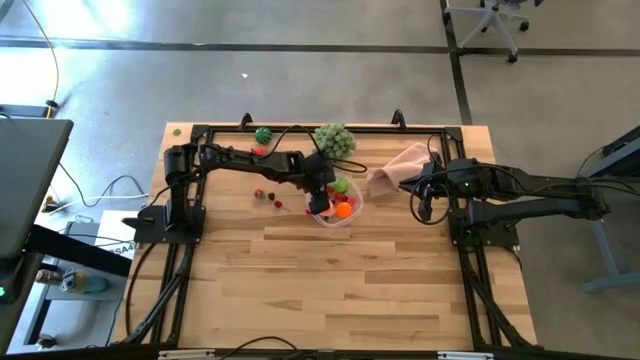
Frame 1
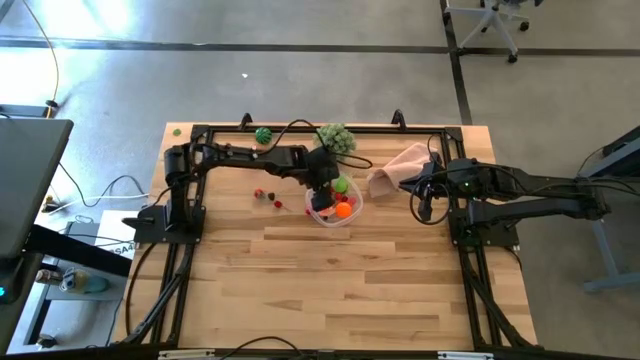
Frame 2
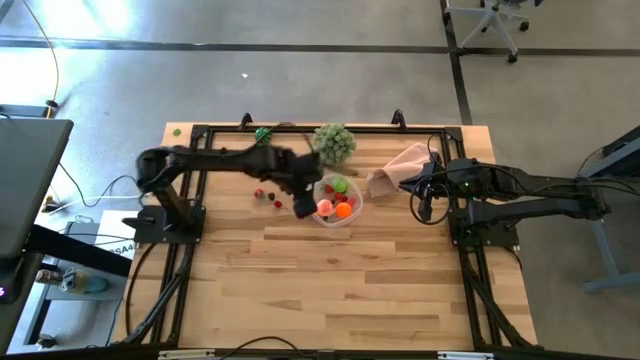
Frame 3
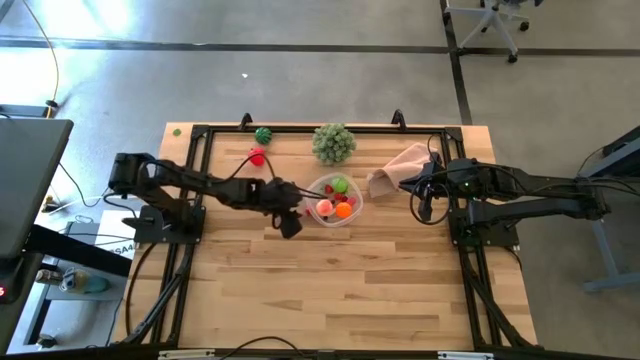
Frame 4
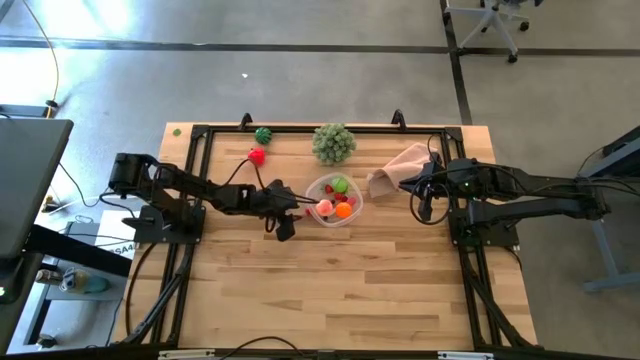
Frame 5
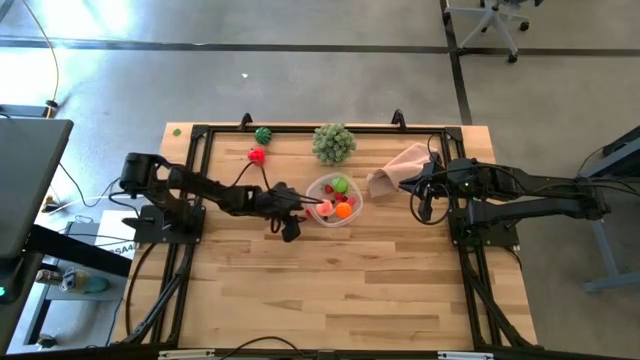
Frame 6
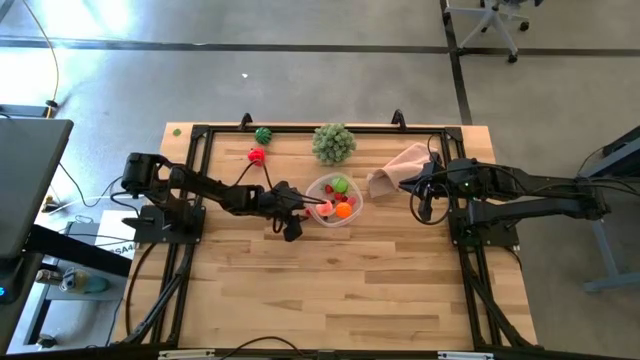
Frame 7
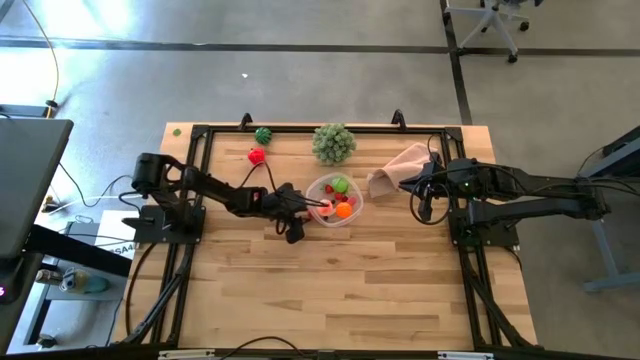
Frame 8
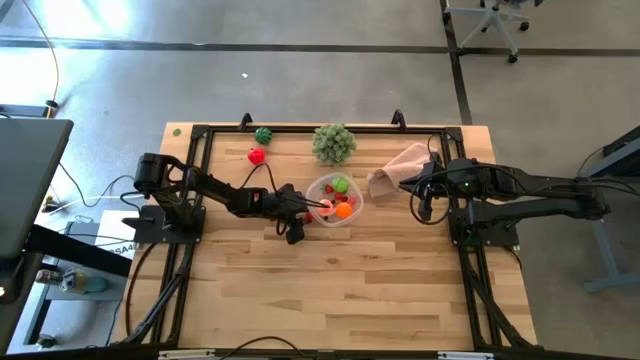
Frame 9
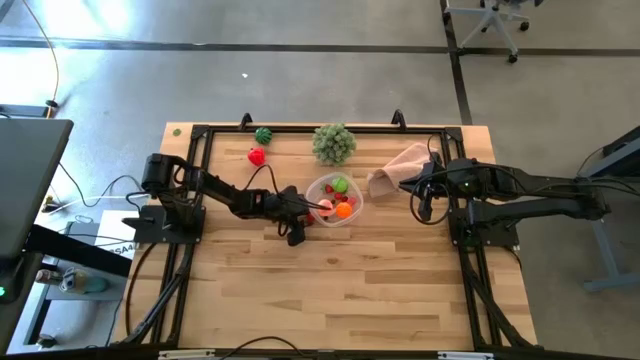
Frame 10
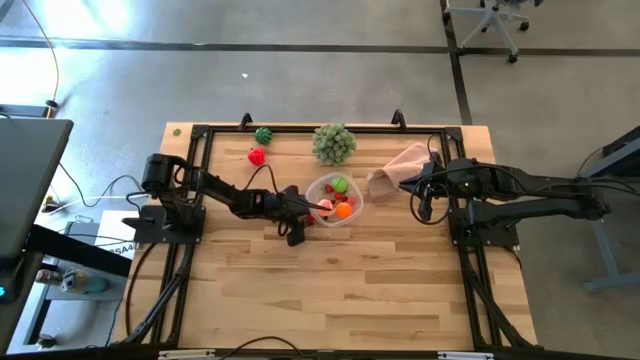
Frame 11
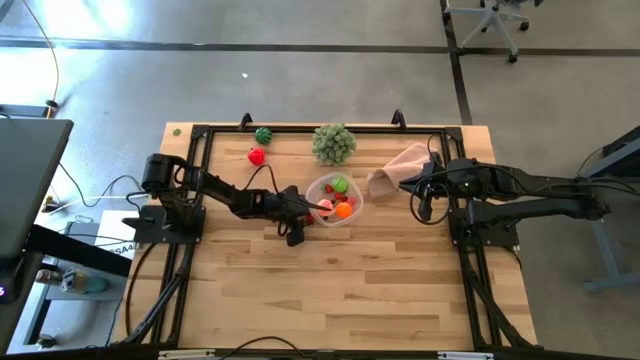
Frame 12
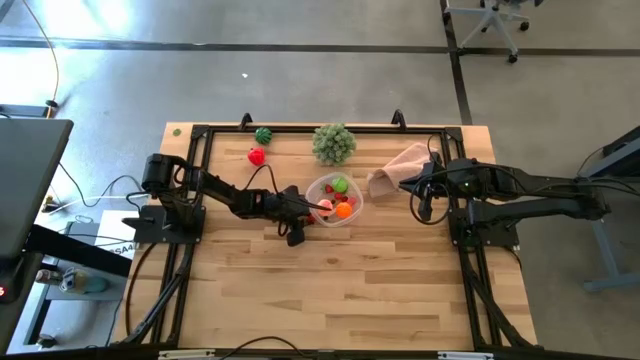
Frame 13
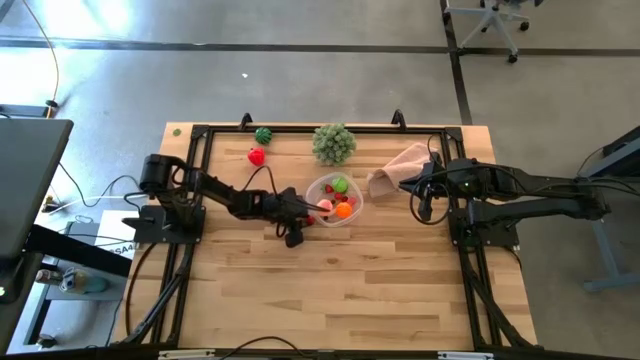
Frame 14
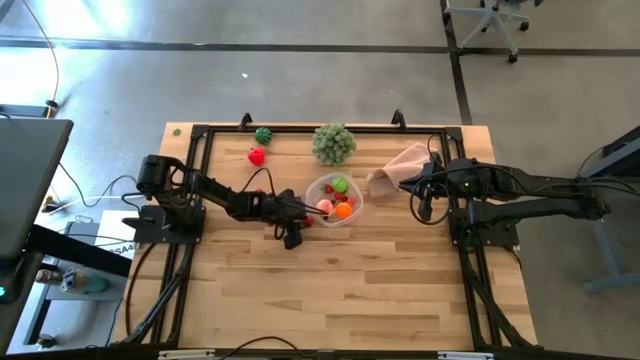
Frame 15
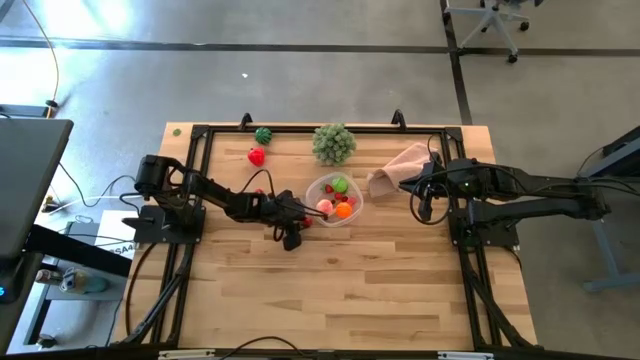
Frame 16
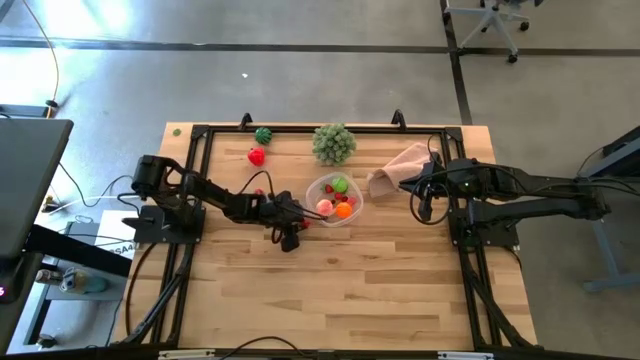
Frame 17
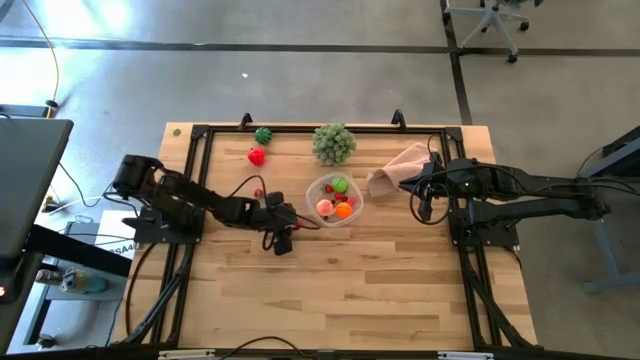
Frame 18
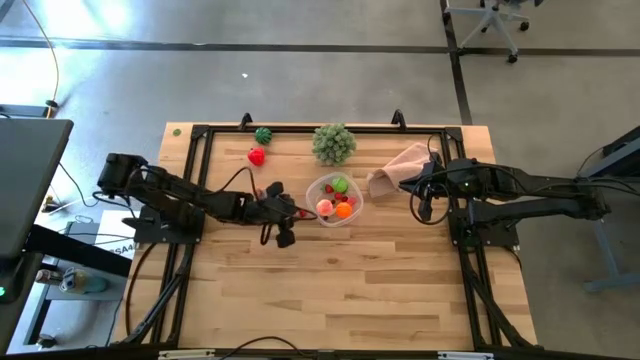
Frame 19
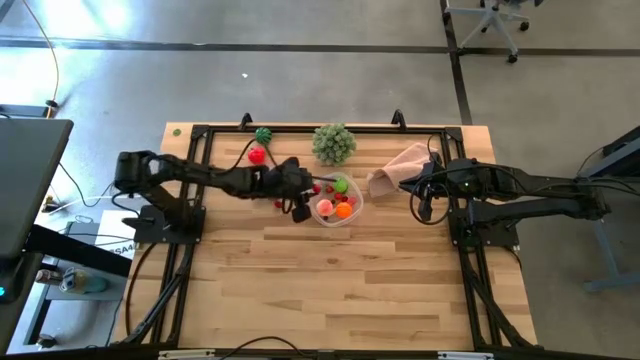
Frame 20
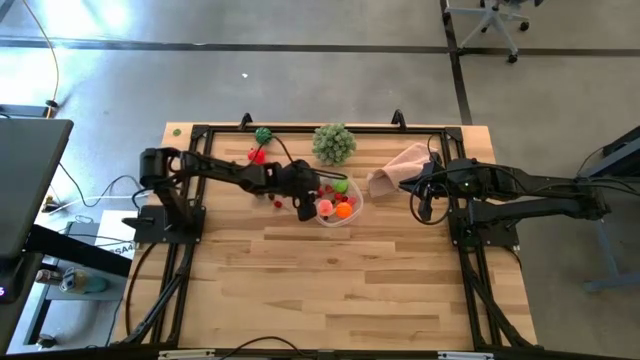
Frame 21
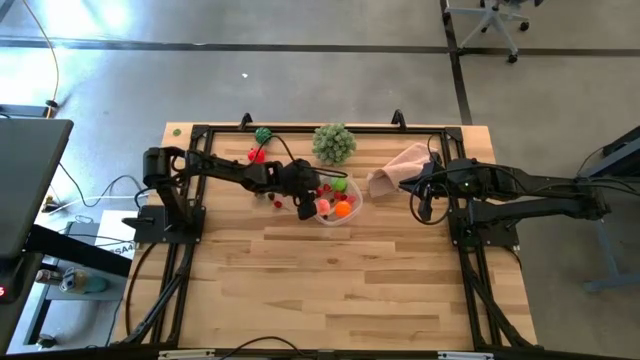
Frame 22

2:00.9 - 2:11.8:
Task: Pick and placing Produce into tupperware
Put the right cherry into the container

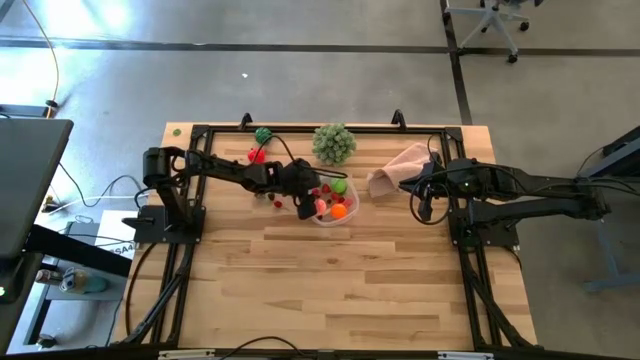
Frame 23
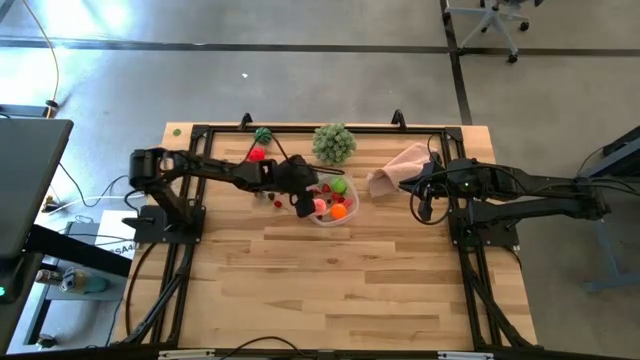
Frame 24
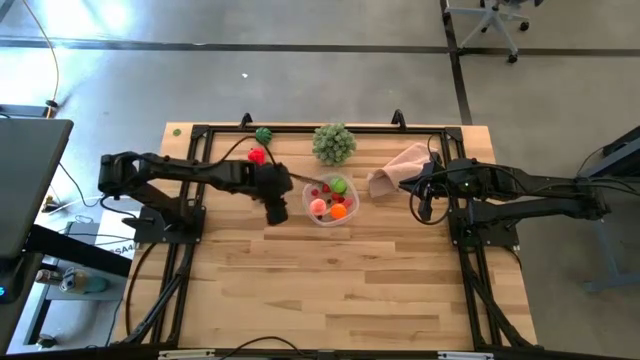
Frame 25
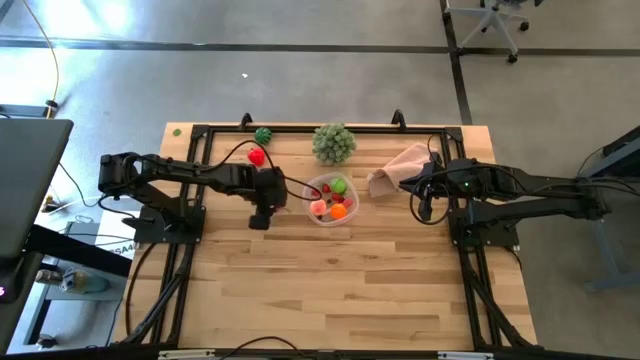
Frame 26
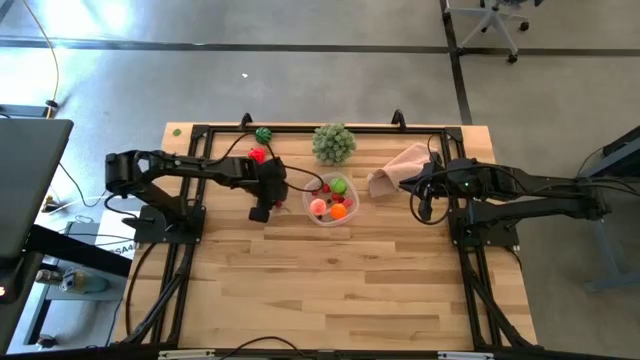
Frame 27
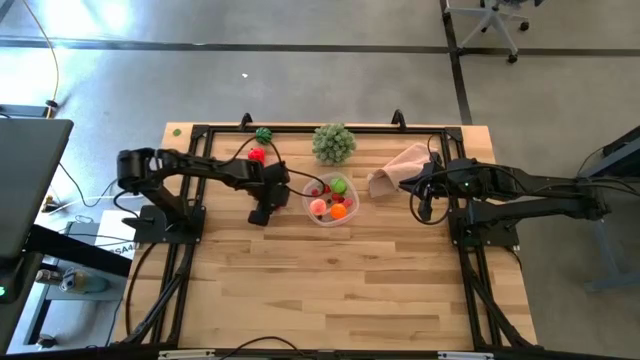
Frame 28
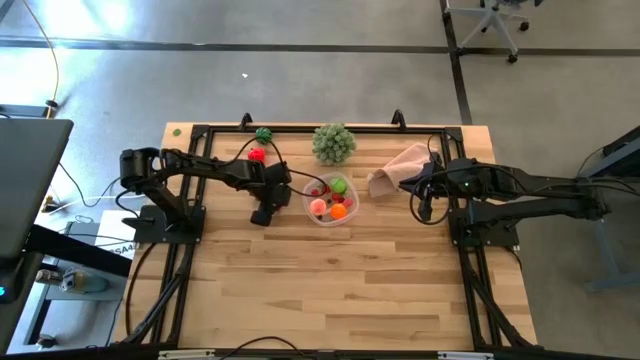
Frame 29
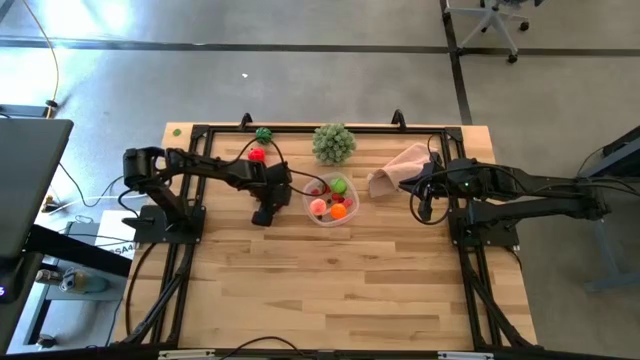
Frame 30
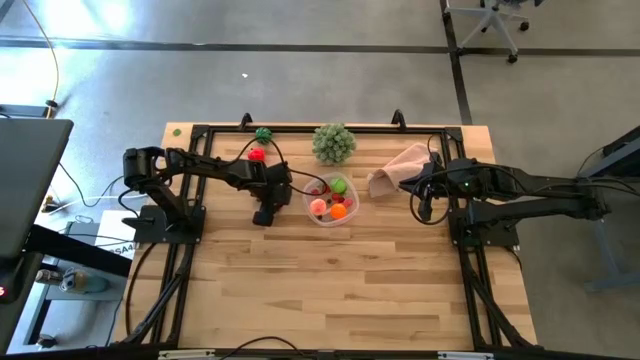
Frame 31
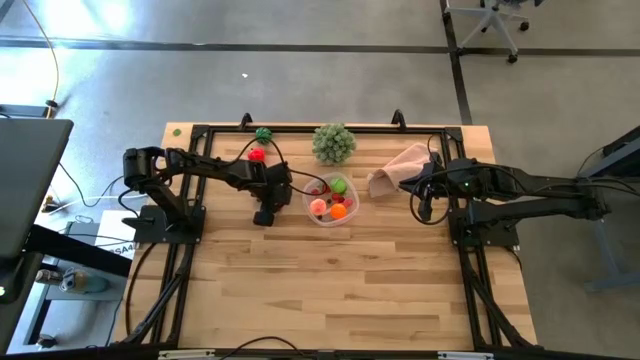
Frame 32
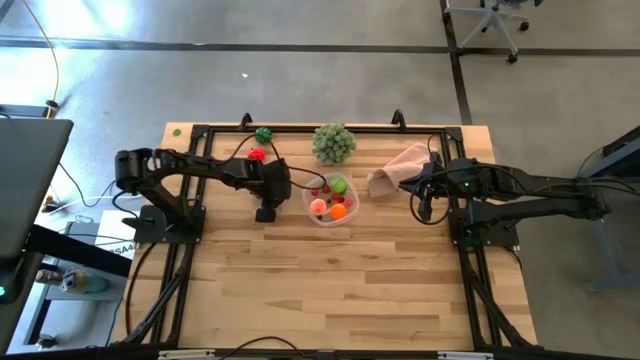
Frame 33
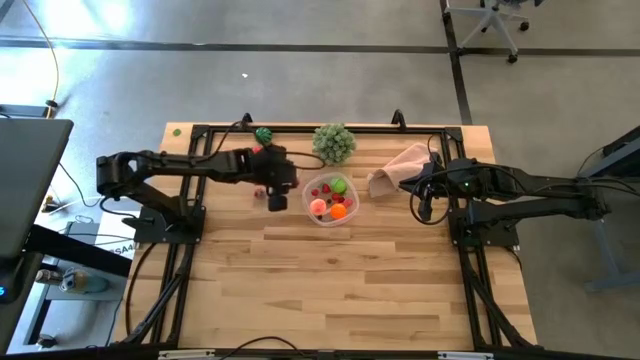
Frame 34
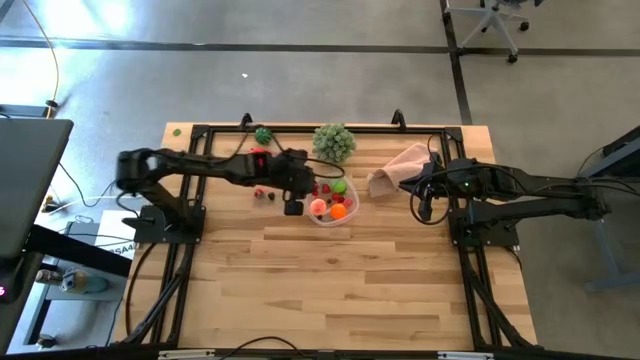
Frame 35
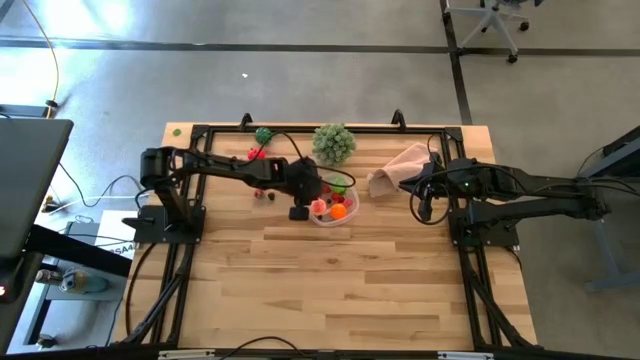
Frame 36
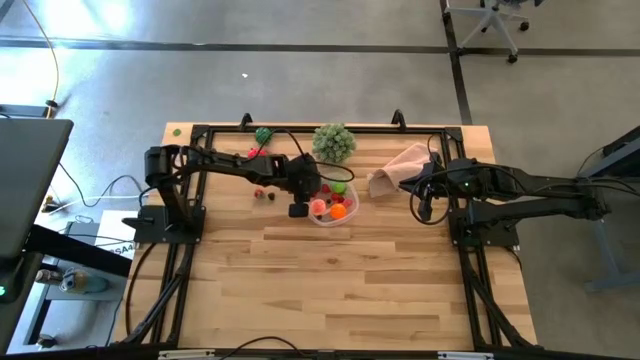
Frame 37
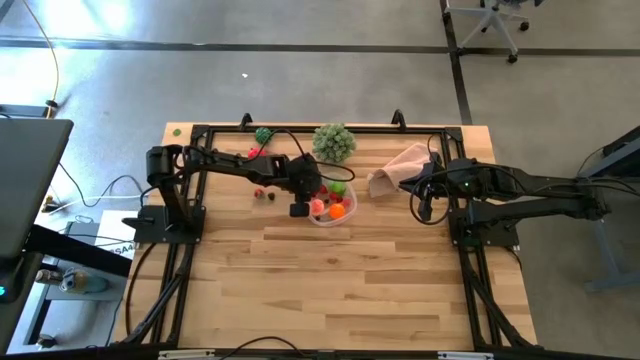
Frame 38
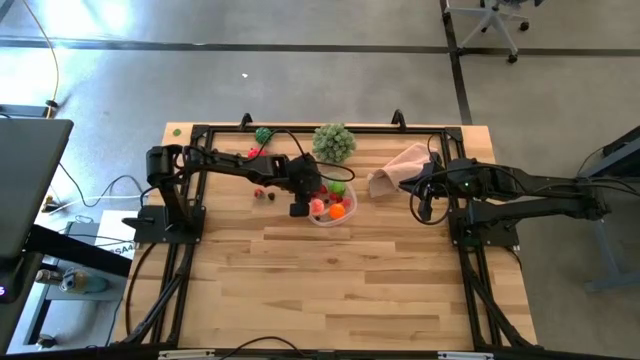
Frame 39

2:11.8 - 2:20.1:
Put the cherry into the container

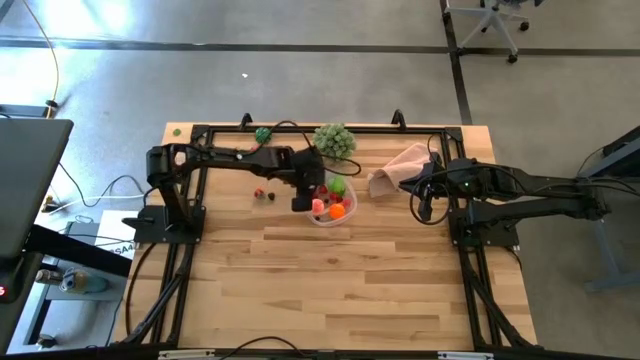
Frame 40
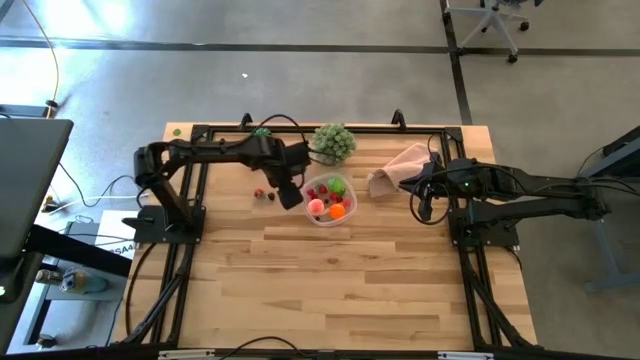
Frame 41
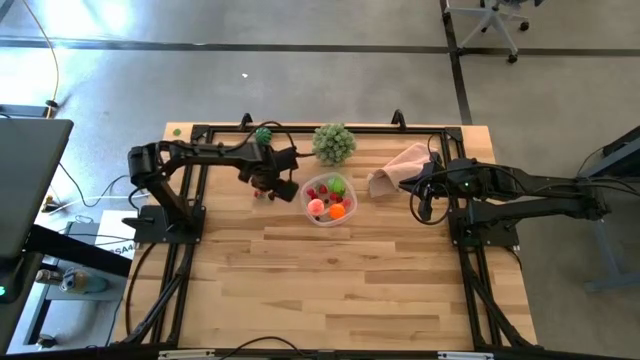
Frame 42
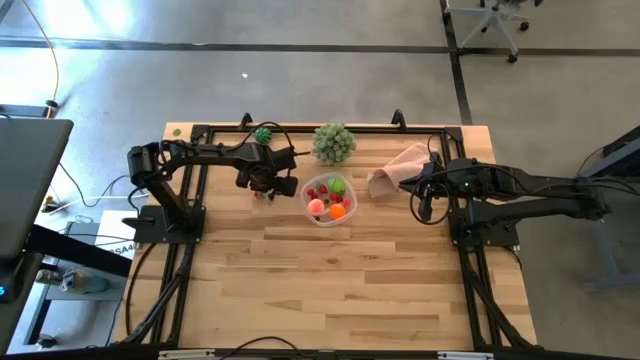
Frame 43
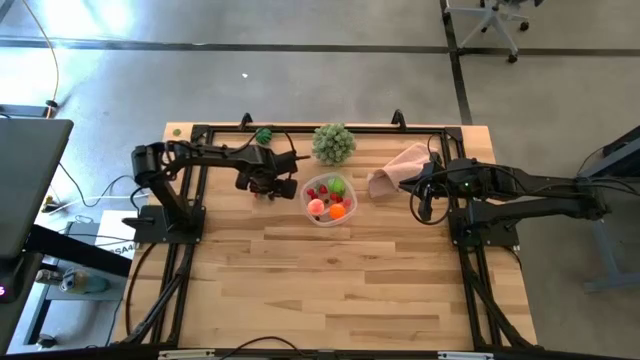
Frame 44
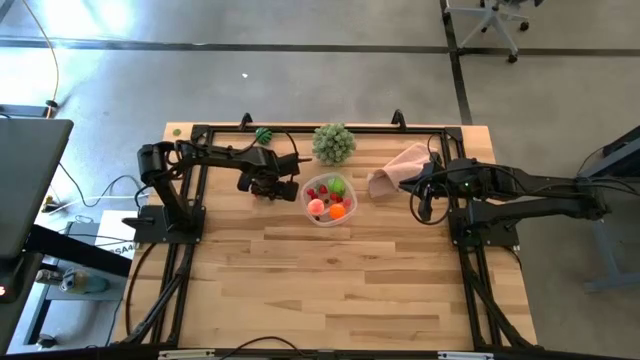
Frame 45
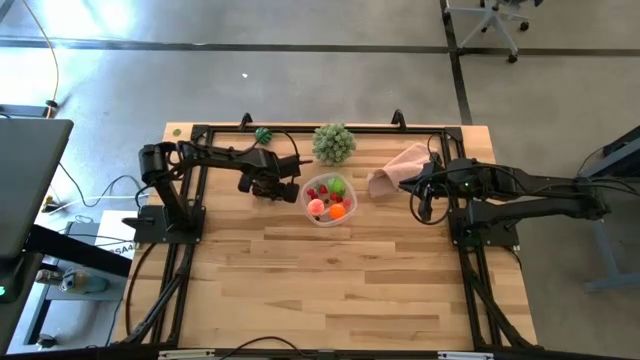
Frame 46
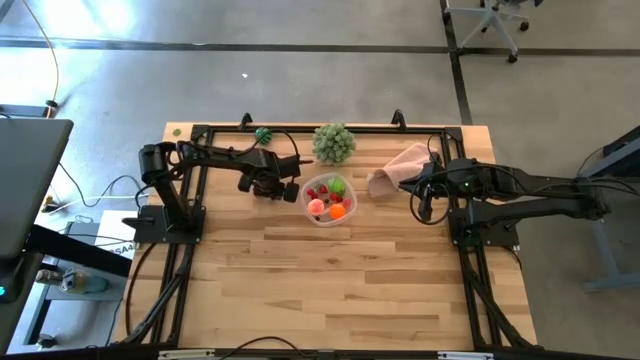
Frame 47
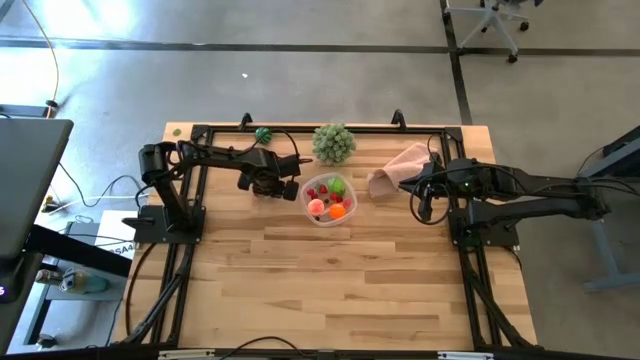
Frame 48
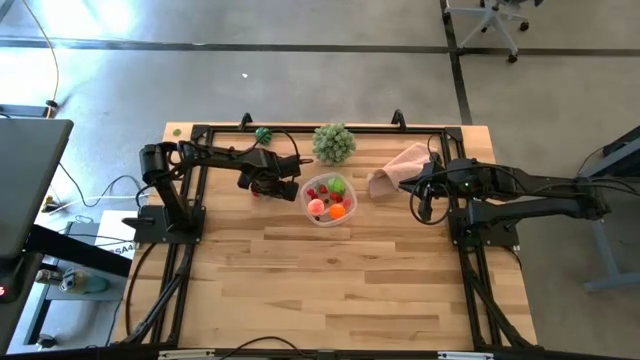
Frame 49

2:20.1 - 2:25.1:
Put the blackberry into the container
